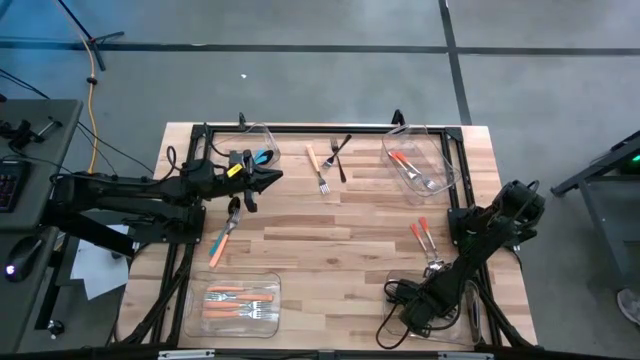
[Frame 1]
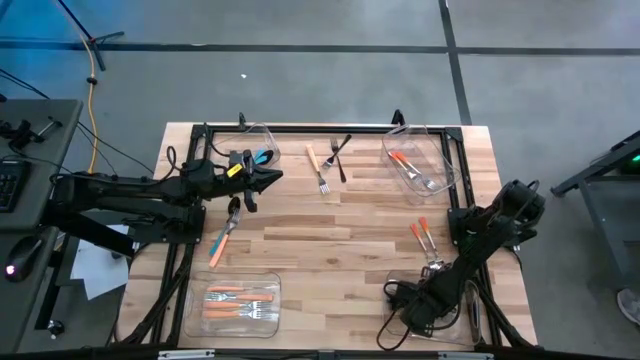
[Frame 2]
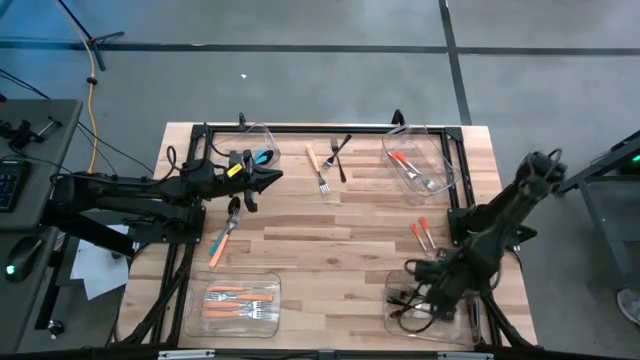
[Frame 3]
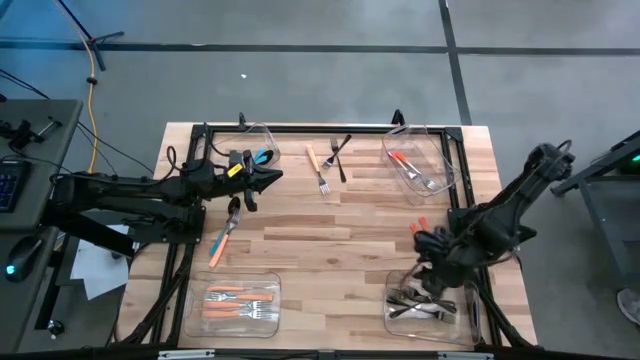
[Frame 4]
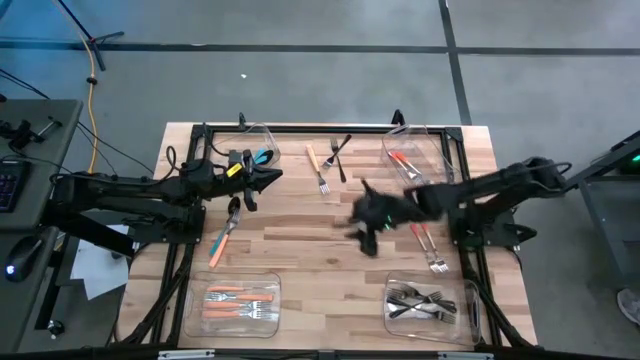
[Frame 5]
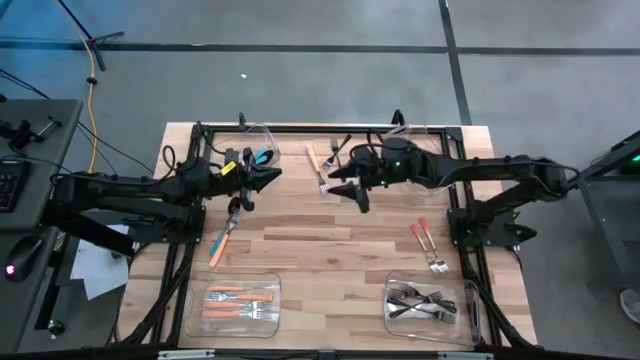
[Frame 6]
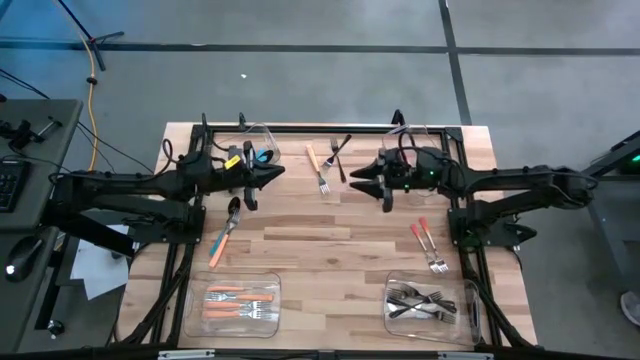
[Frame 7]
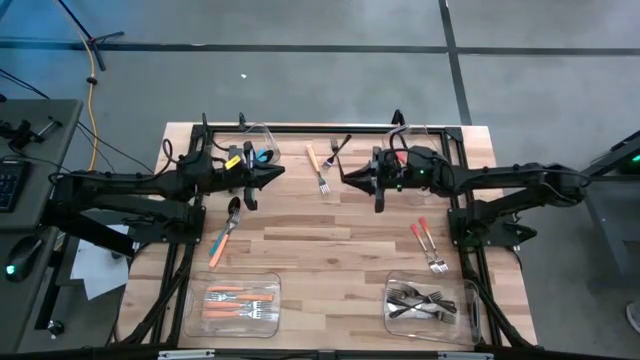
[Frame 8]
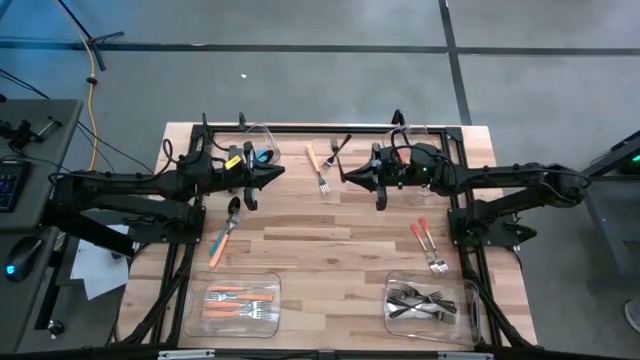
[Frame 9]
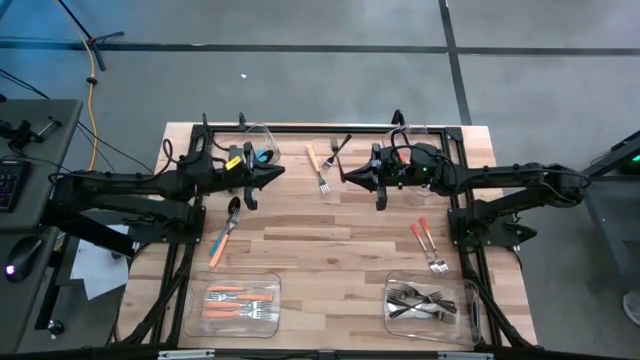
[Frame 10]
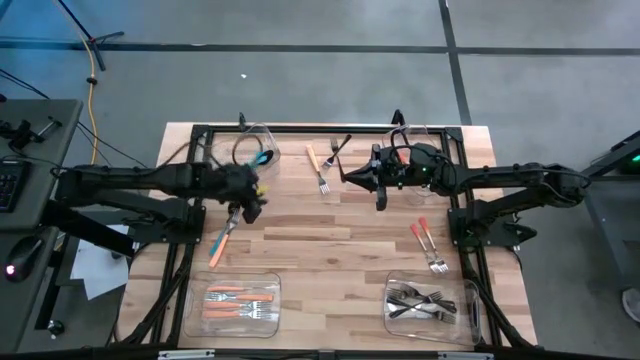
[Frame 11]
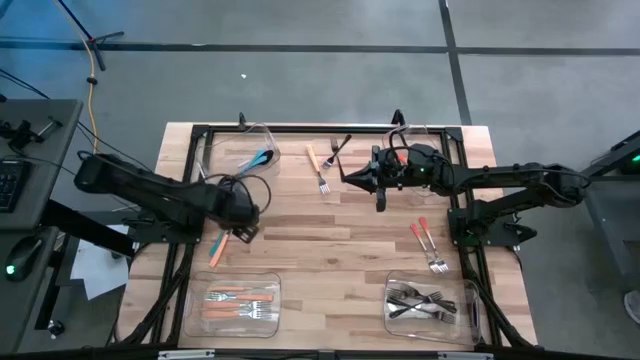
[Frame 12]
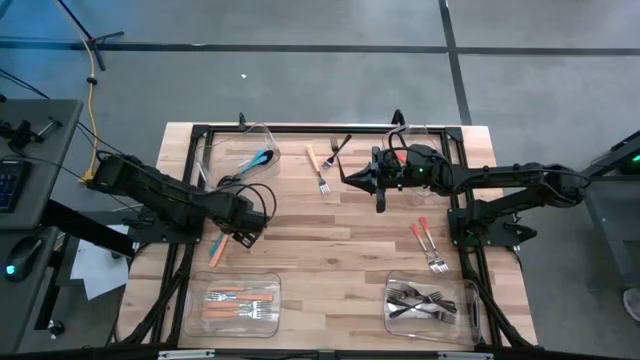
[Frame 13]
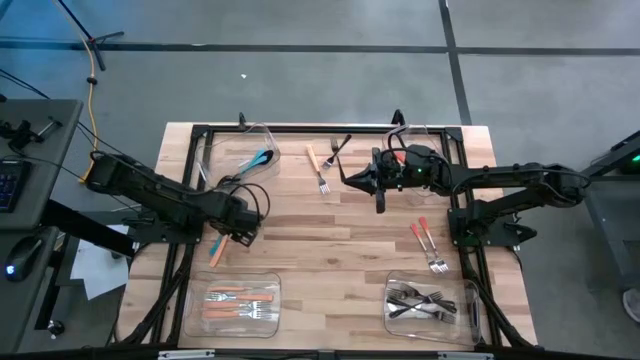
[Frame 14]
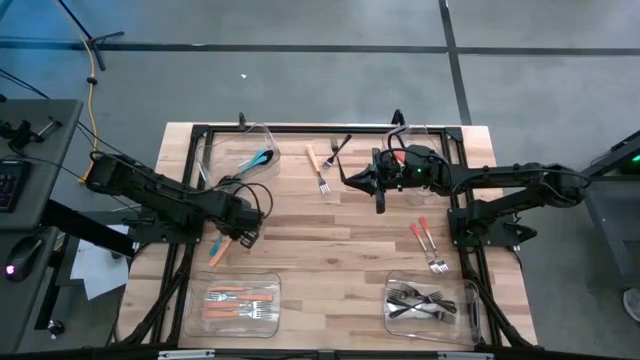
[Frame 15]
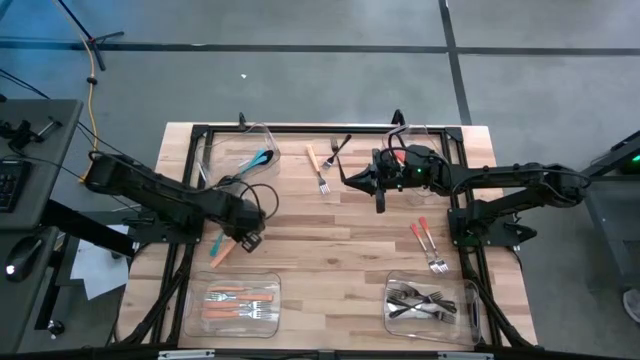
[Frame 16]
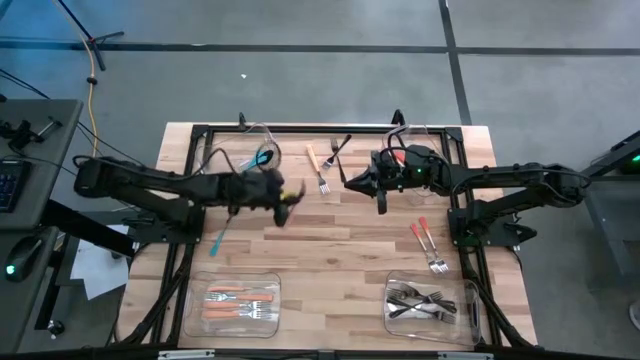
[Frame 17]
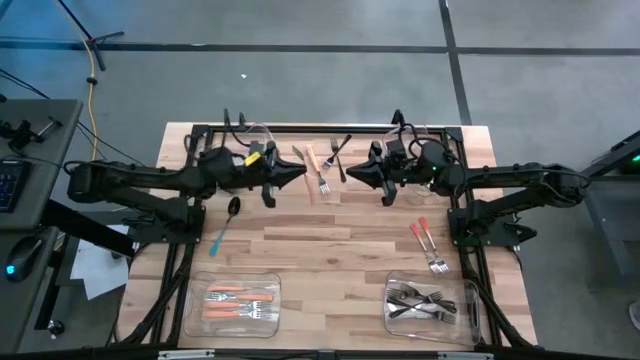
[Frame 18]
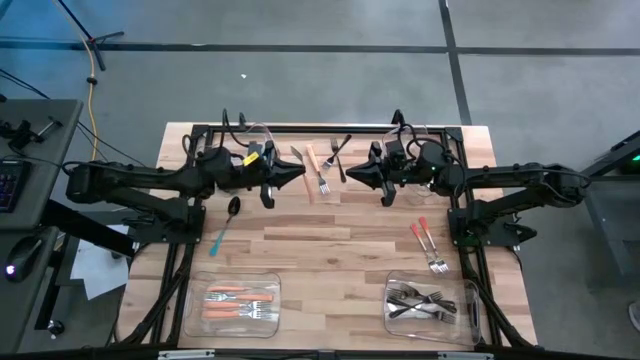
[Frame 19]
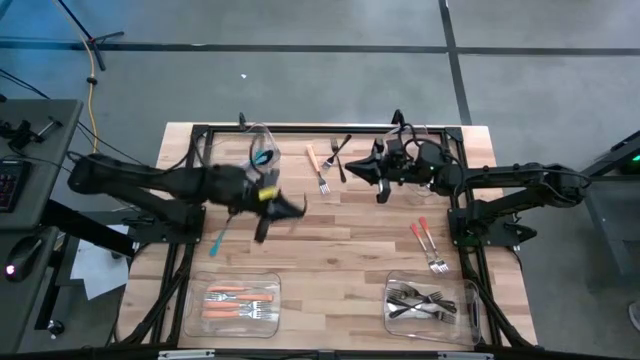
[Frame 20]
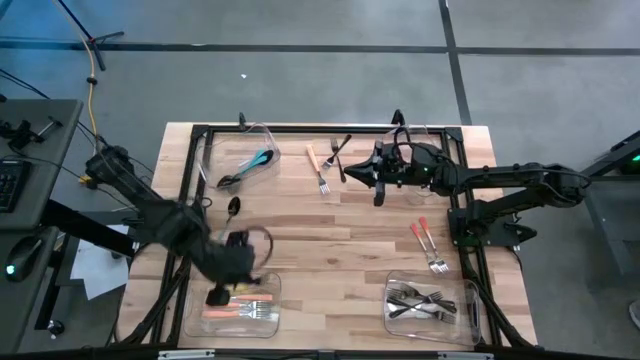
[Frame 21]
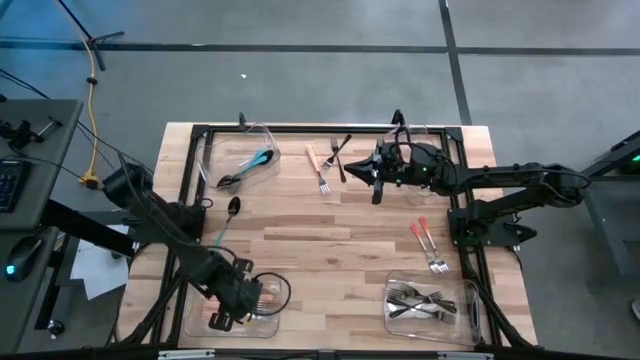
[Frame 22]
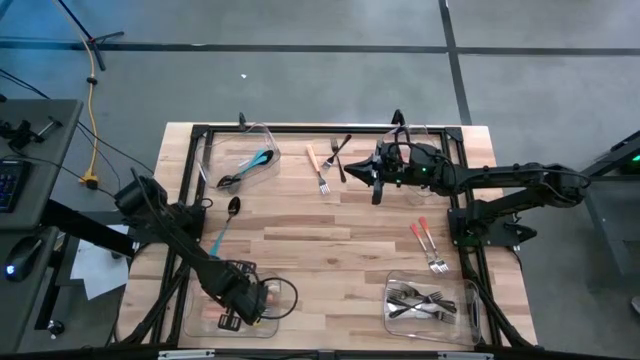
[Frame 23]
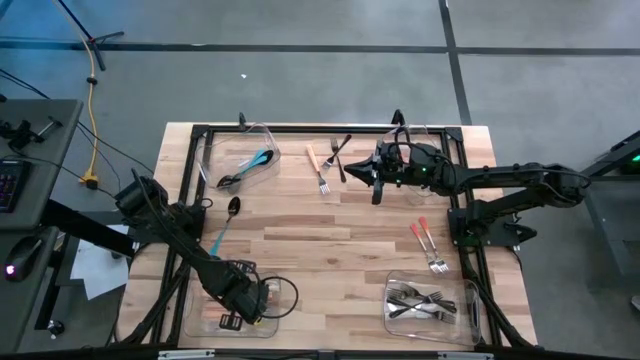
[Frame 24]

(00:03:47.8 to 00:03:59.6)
Task: Sort silverware by color (type)
Put the light orange fork into the bottom left transparent bin

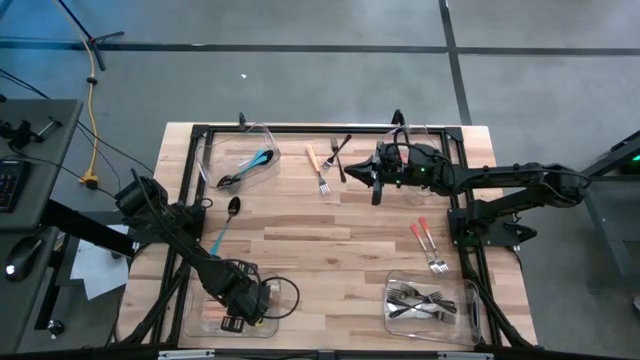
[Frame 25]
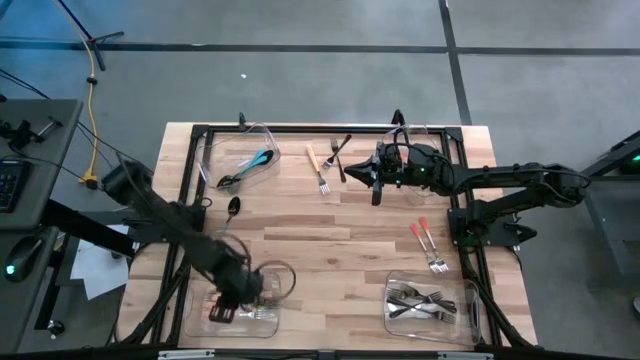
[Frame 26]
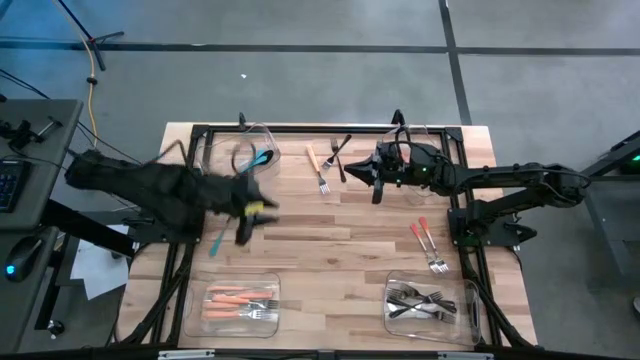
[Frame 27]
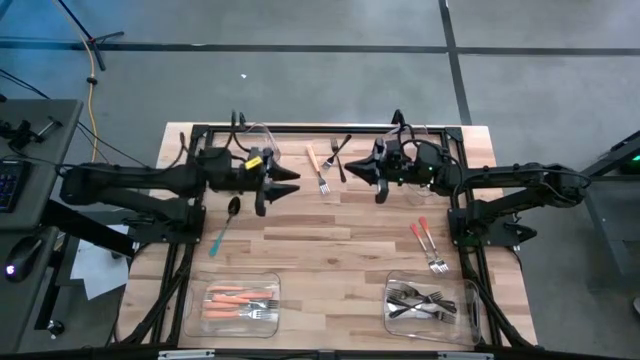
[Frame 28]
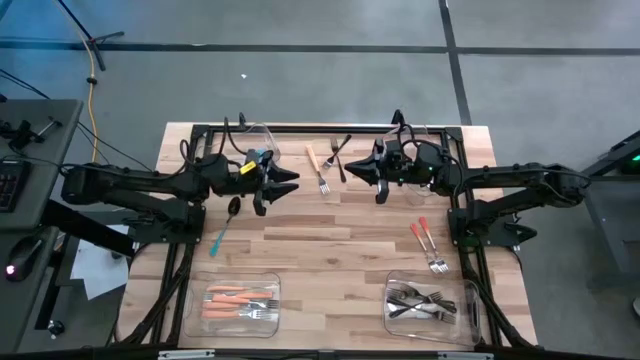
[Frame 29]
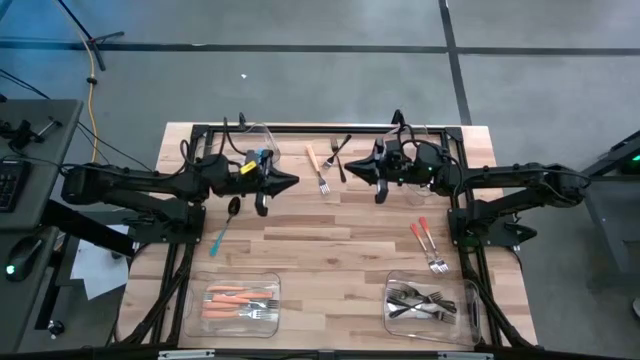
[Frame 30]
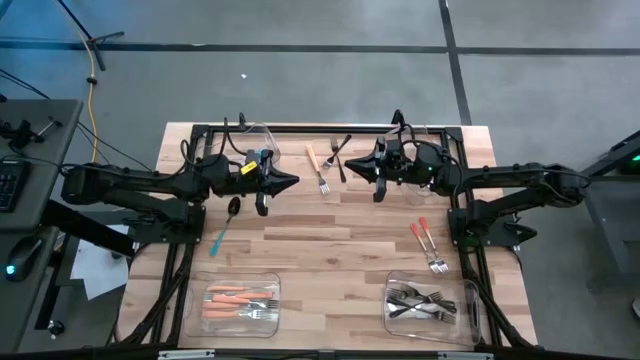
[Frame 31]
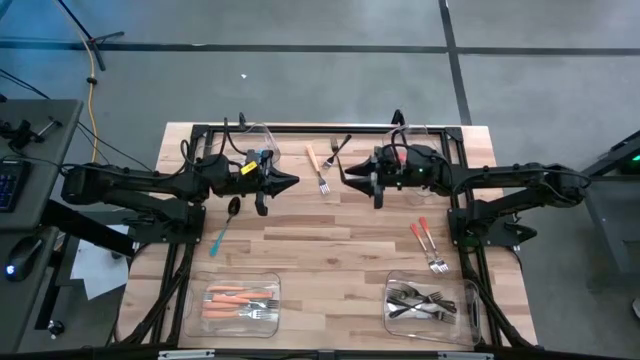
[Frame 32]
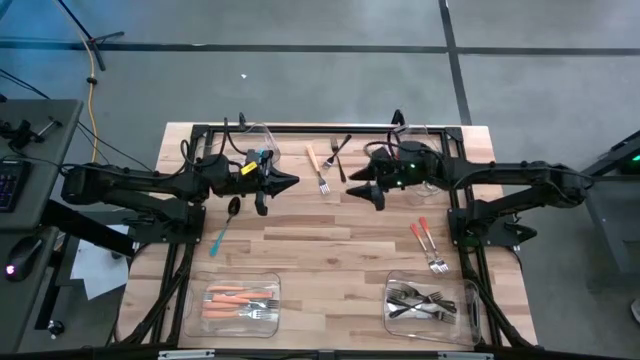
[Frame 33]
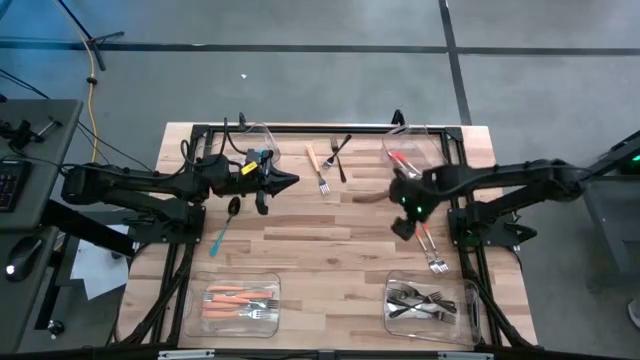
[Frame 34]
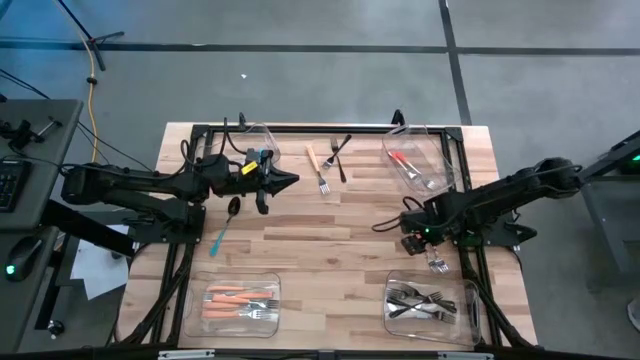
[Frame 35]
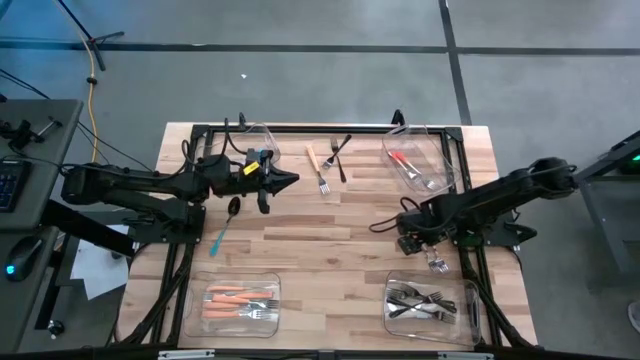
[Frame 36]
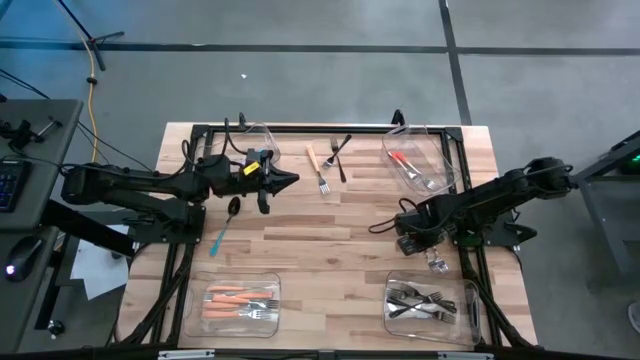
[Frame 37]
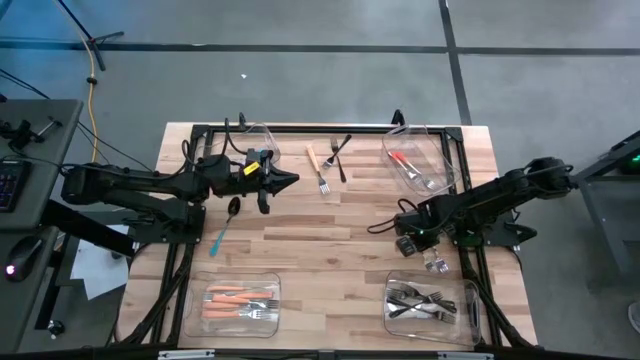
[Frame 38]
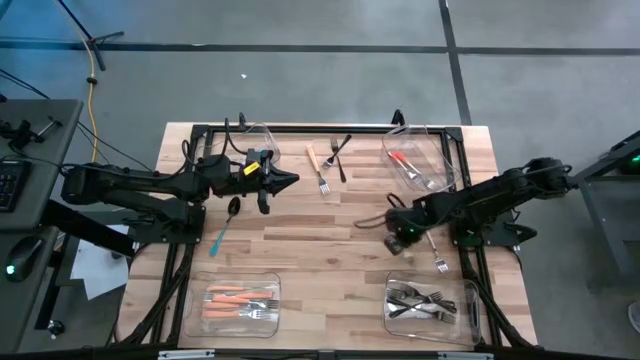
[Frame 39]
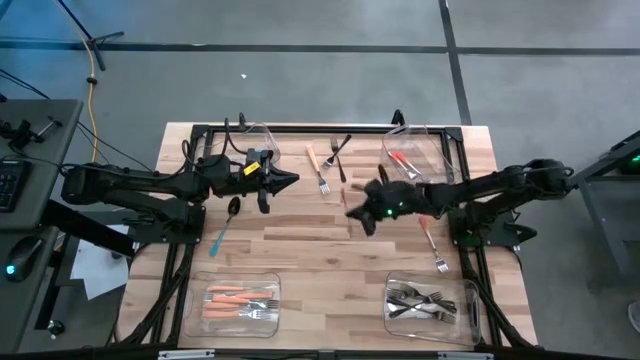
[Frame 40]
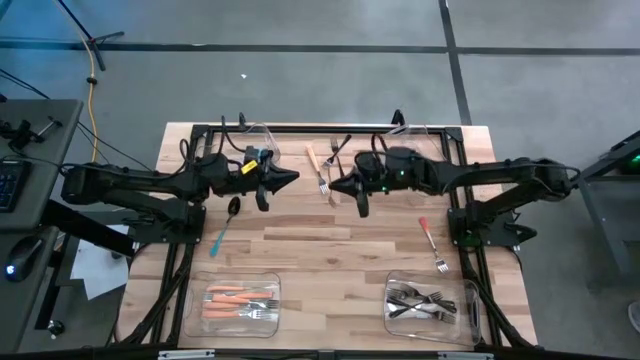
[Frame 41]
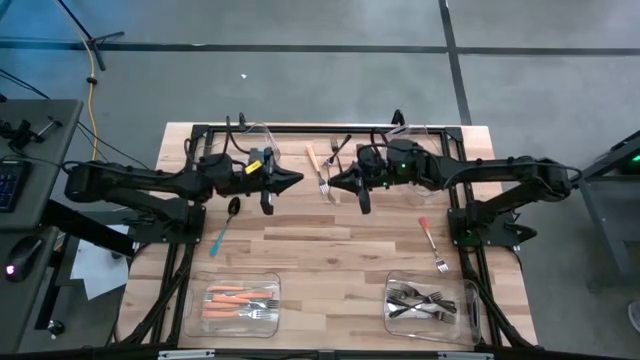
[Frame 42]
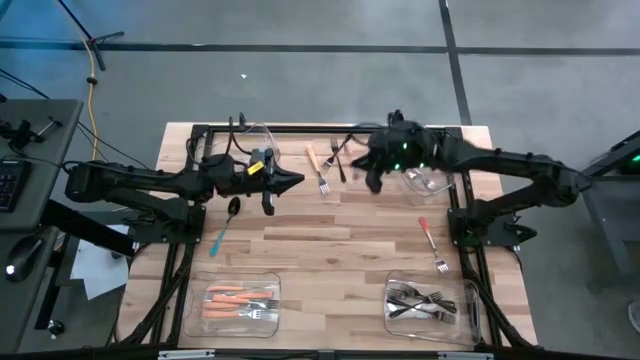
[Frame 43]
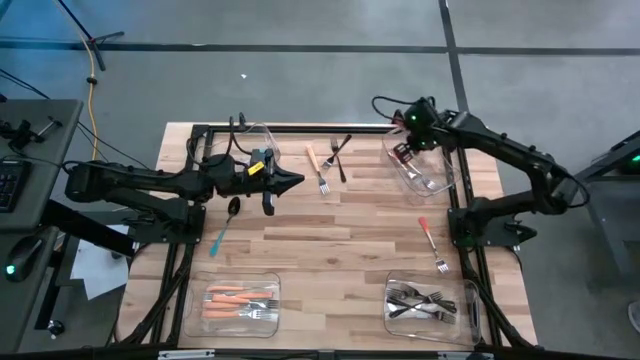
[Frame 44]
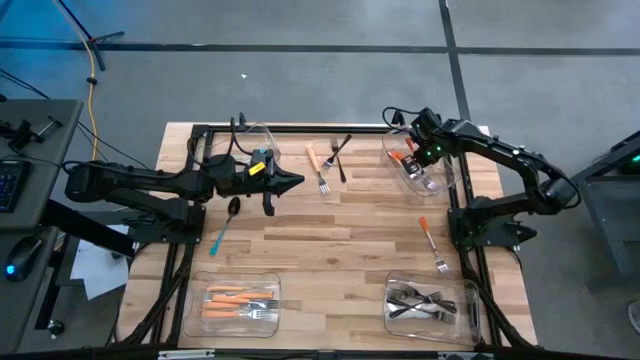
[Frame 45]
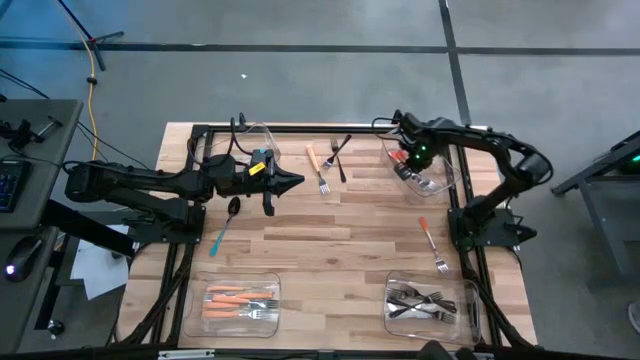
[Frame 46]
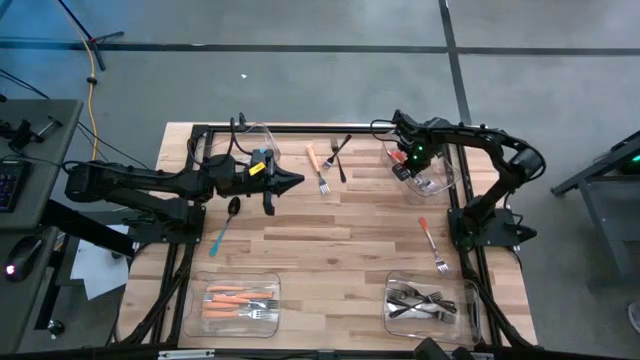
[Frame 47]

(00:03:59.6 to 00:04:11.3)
Put the orange fork into the top right transparent bin
